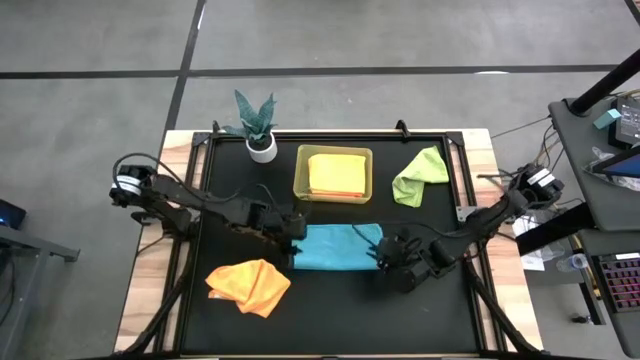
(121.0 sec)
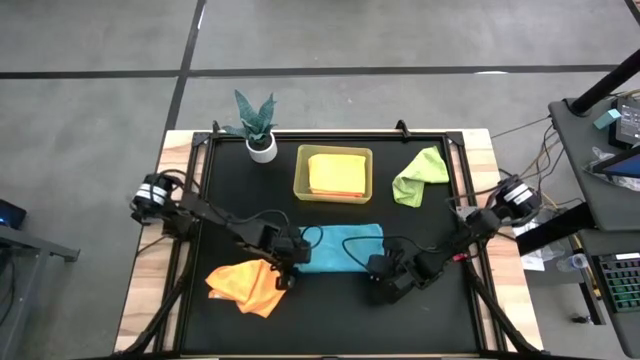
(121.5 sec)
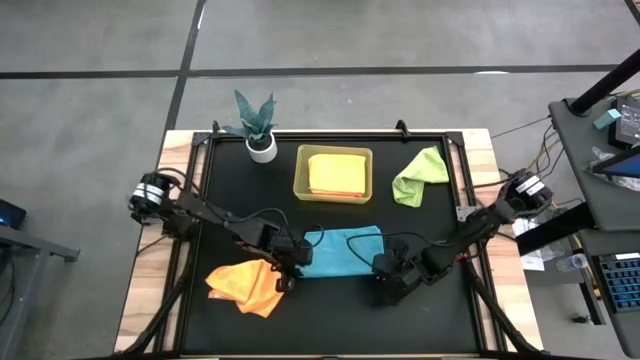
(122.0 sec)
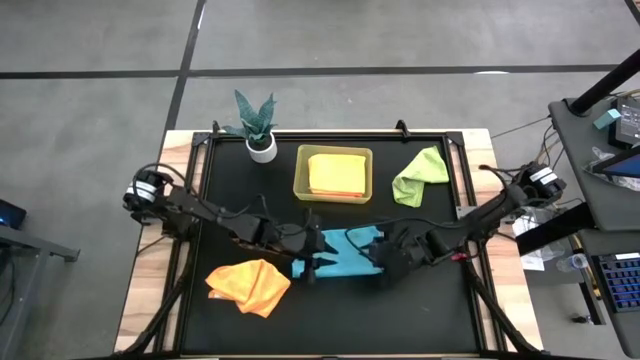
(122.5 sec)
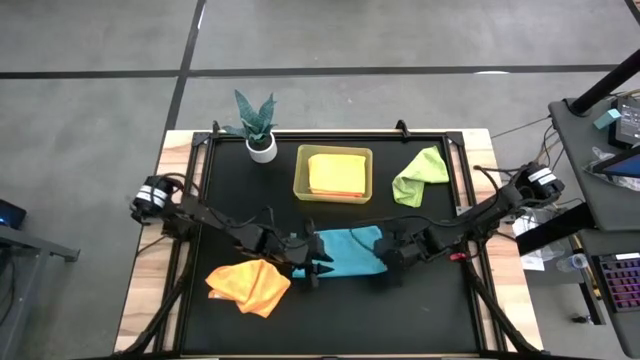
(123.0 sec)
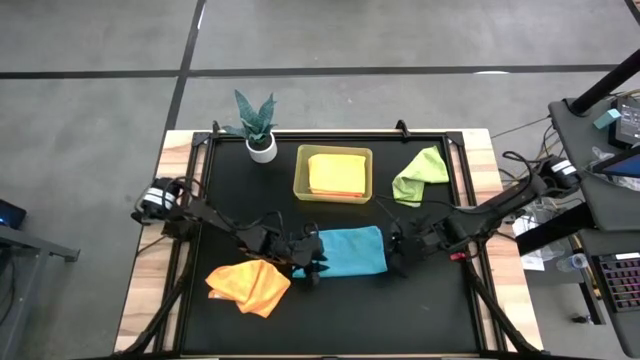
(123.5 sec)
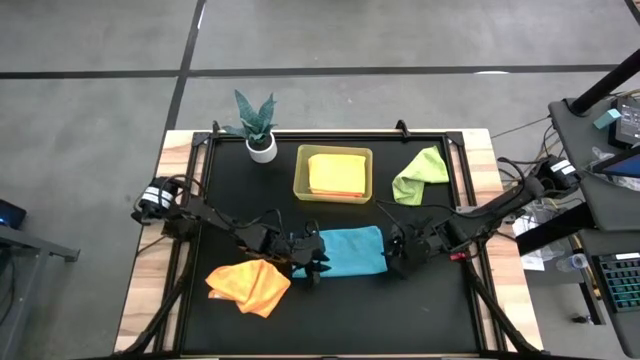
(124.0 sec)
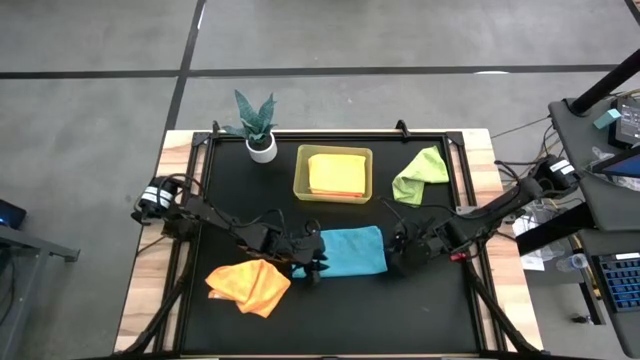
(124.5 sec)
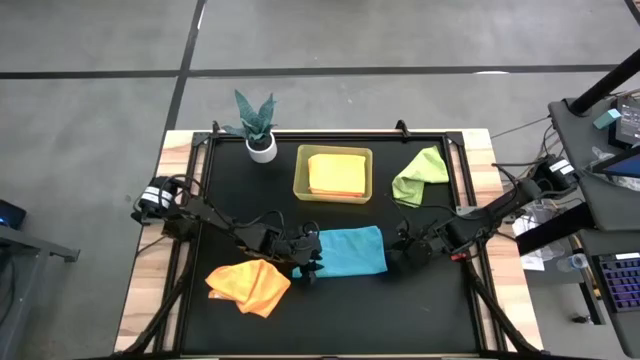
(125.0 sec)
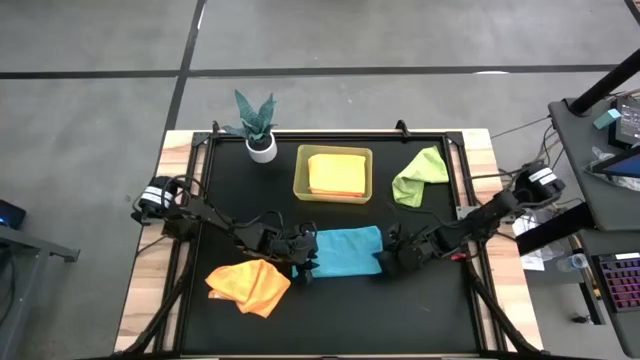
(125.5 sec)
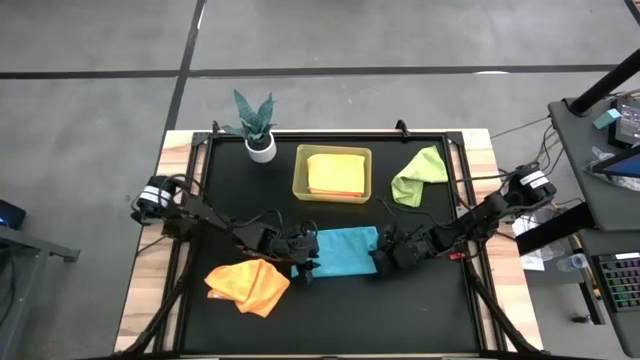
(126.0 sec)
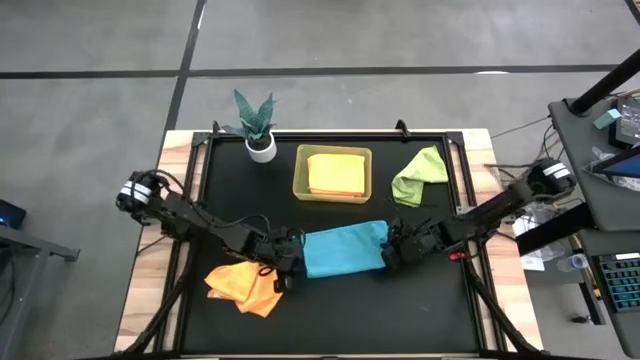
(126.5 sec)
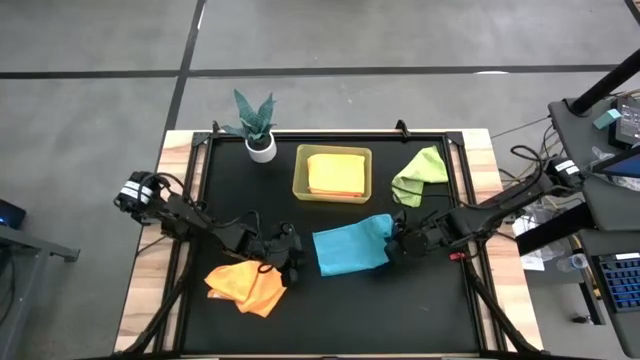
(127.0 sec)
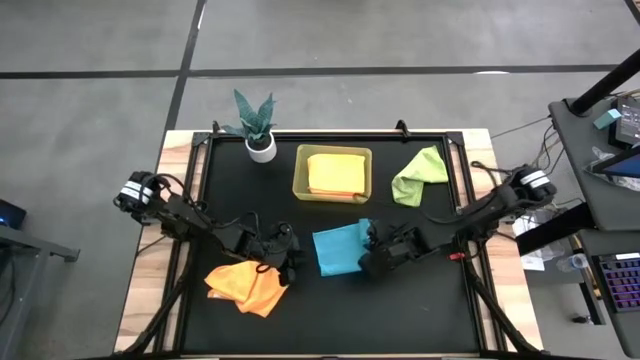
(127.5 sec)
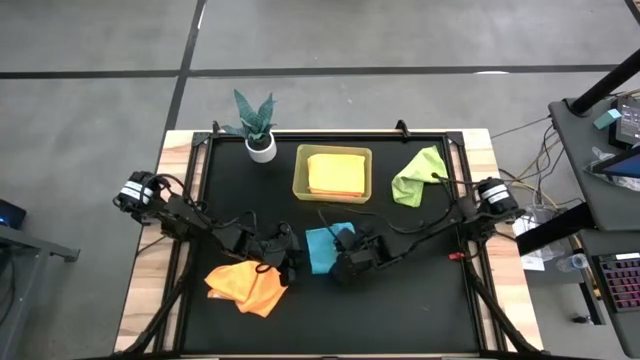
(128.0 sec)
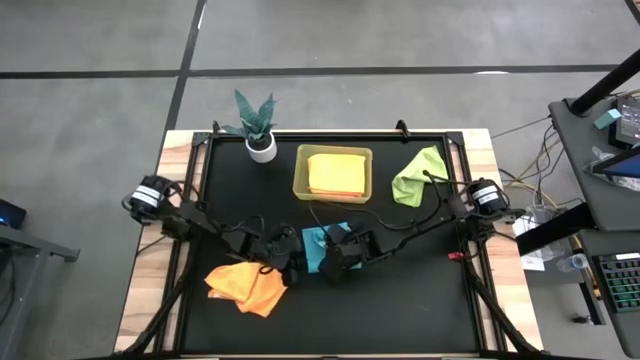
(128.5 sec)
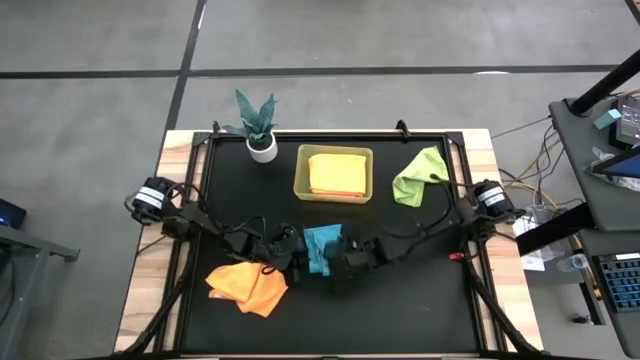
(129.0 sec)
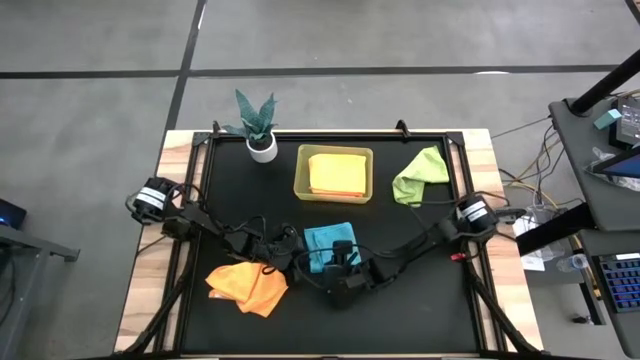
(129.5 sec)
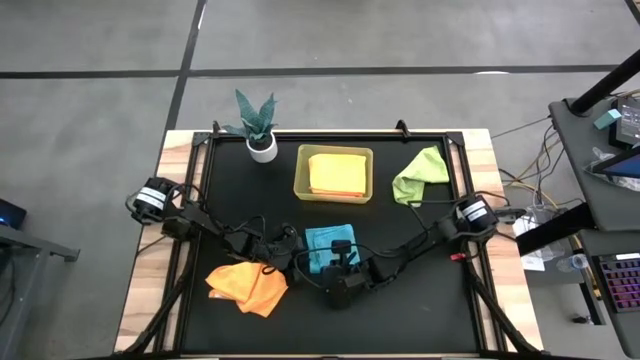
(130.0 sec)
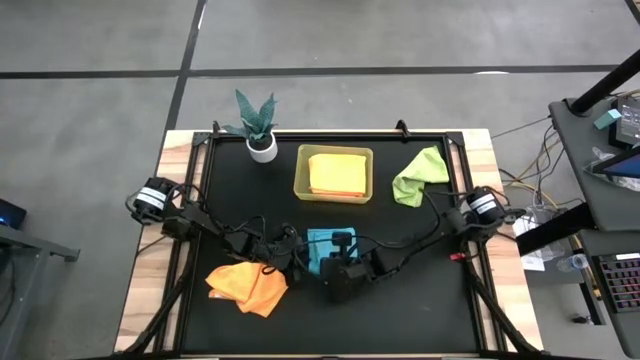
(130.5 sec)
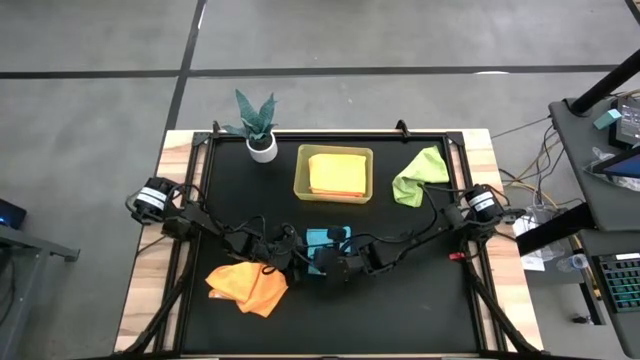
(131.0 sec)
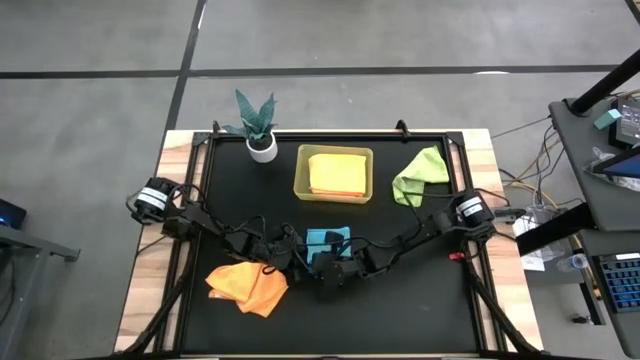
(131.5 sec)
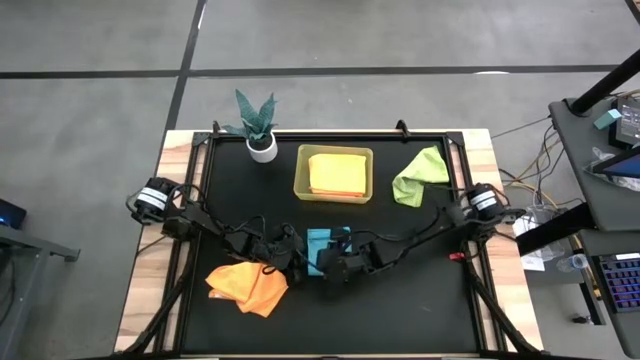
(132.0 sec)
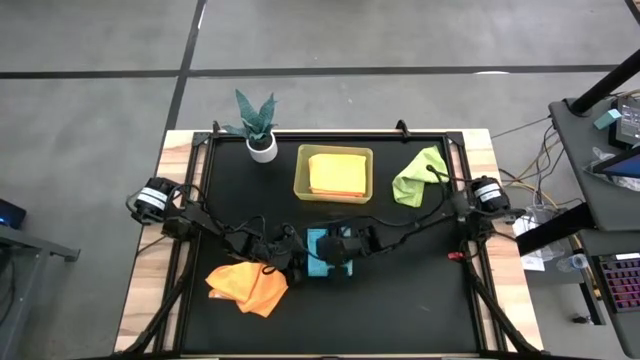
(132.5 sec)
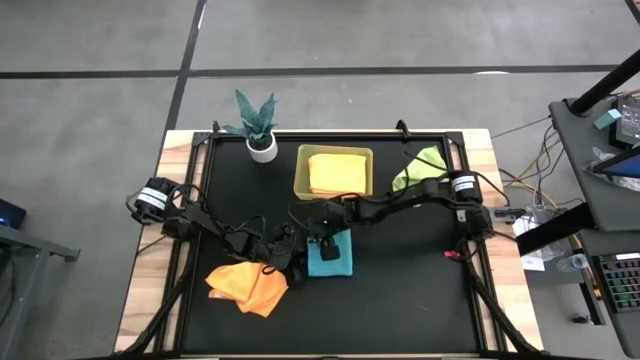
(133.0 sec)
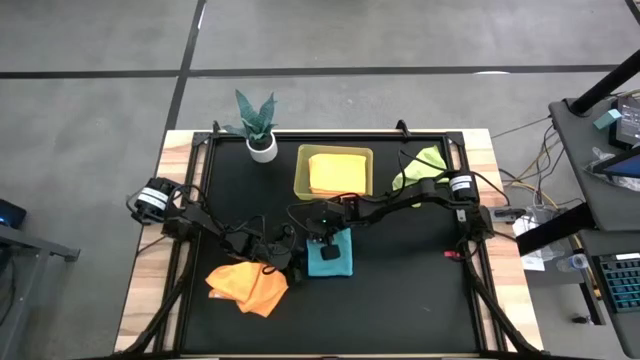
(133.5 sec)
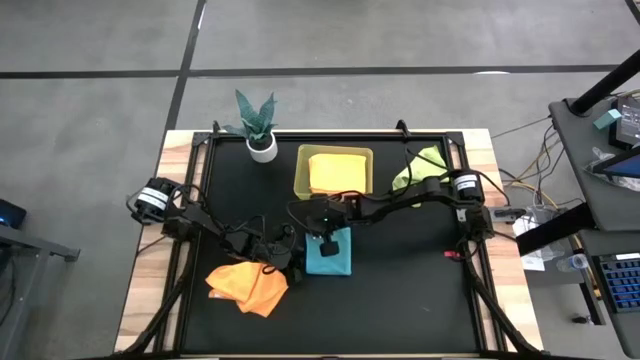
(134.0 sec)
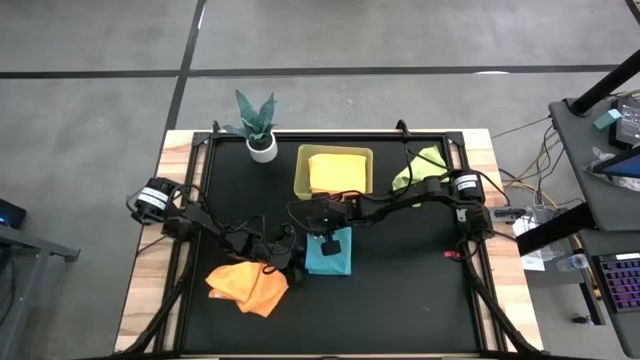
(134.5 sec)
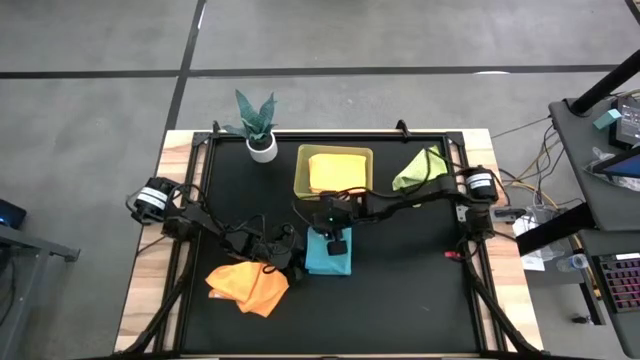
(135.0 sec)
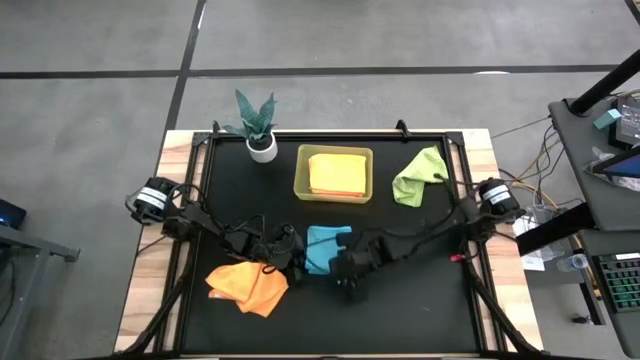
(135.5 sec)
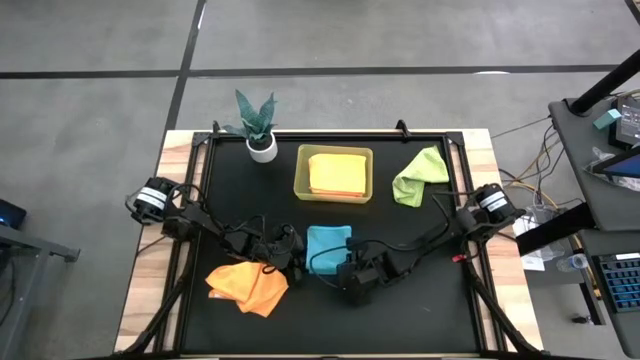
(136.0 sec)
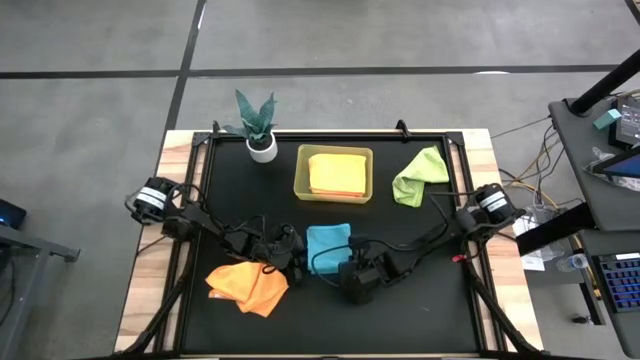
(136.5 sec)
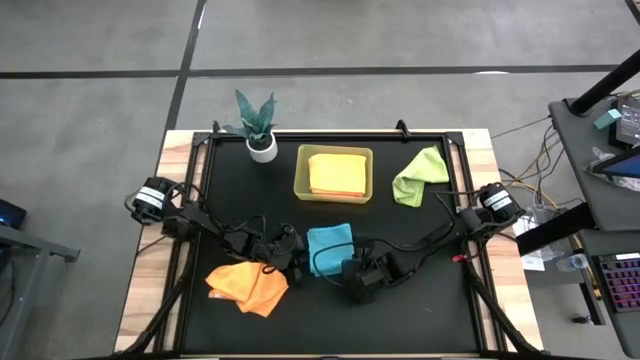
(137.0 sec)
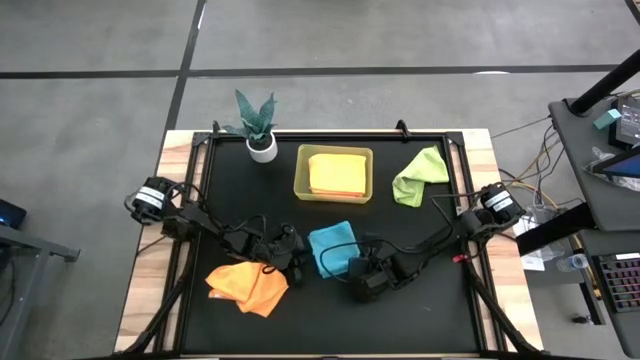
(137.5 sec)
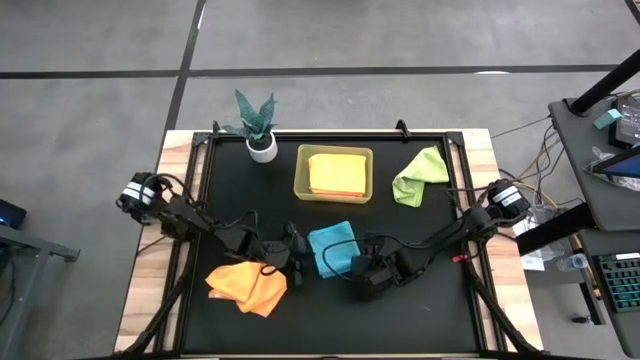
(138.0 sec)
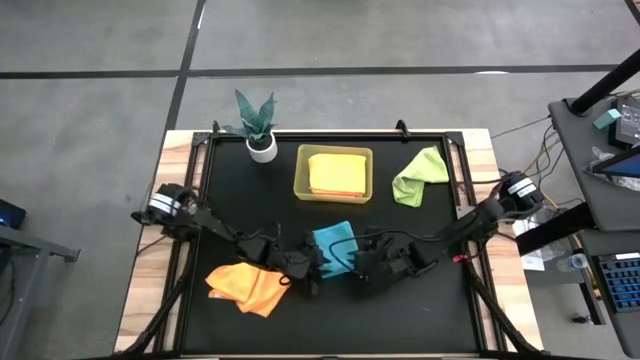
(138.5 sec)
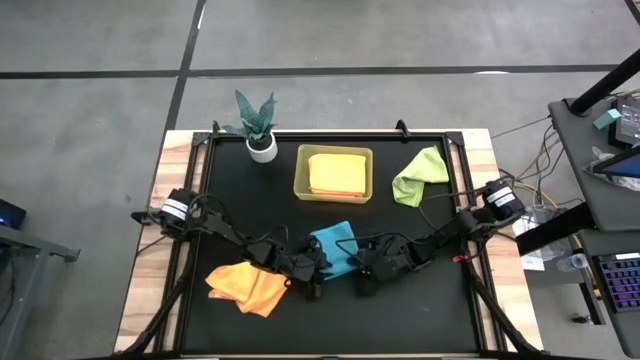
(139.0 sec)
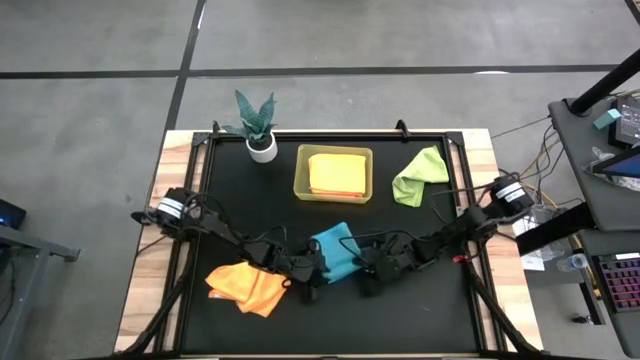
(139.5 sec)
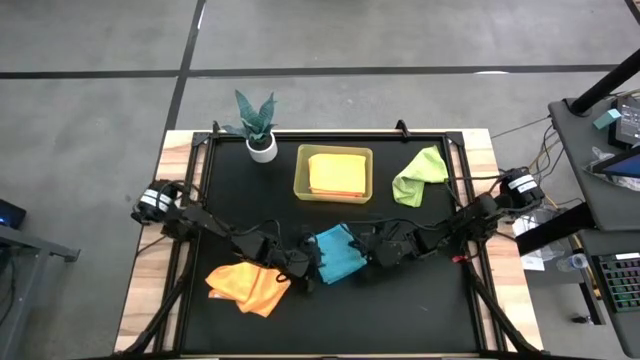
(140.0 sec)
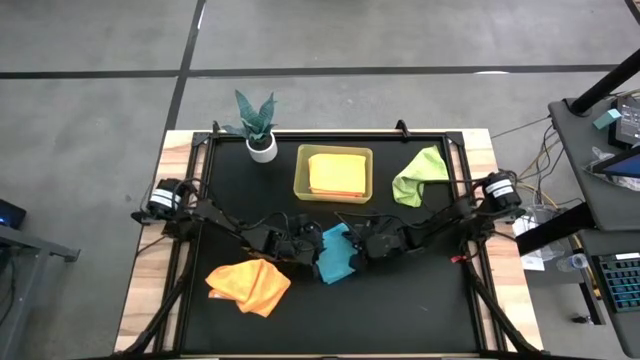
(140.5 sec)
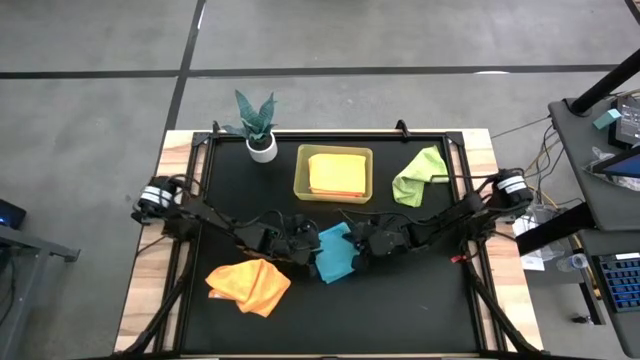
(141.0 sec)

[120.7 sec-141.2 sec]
Task: Fold microfiber towels
Fold the blue towel on the table
